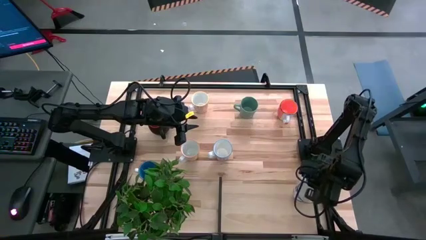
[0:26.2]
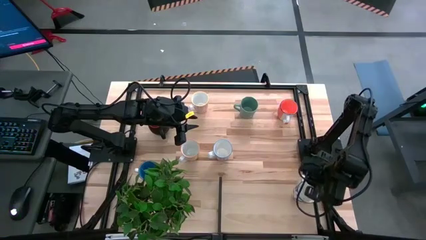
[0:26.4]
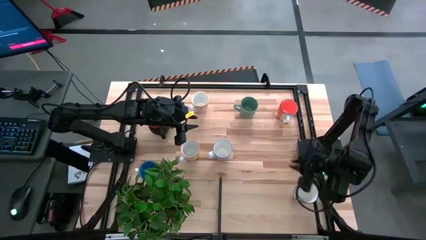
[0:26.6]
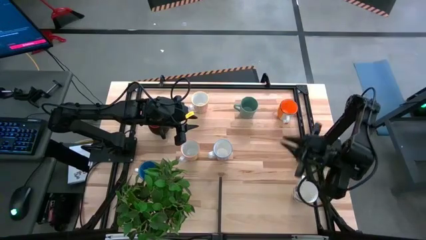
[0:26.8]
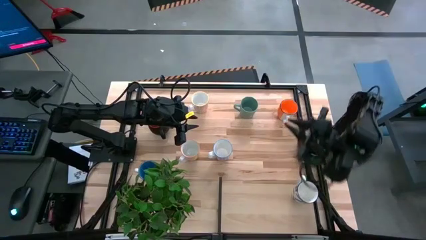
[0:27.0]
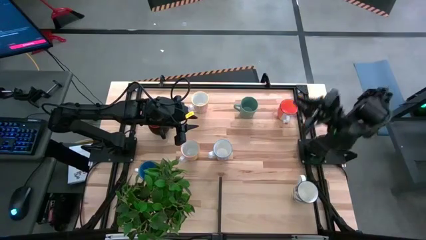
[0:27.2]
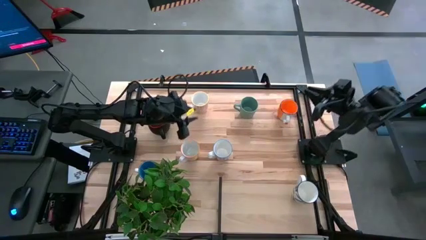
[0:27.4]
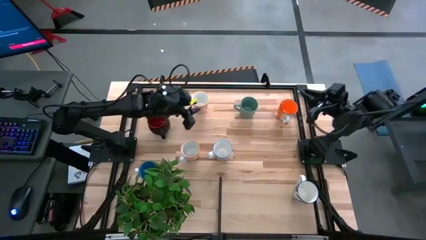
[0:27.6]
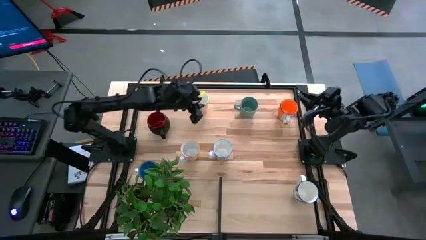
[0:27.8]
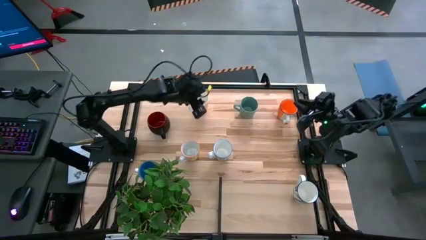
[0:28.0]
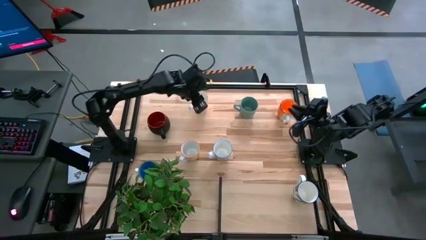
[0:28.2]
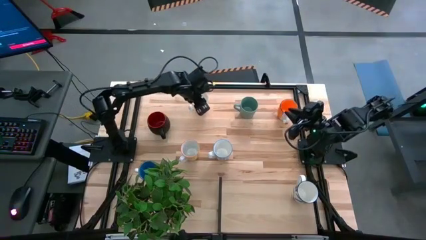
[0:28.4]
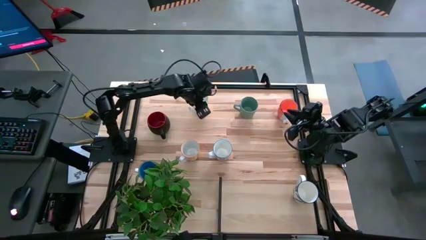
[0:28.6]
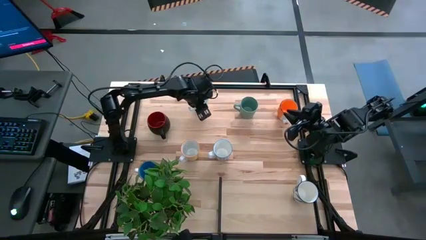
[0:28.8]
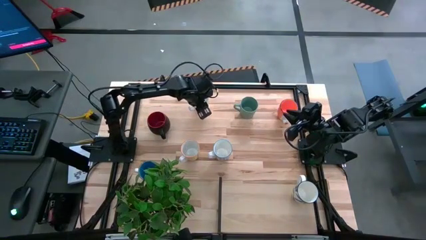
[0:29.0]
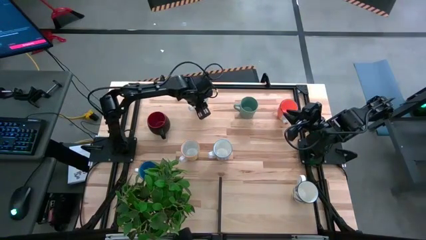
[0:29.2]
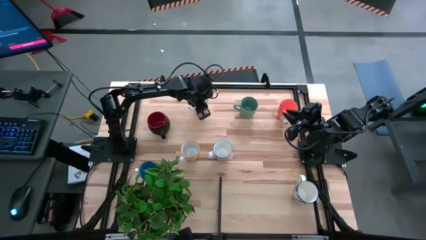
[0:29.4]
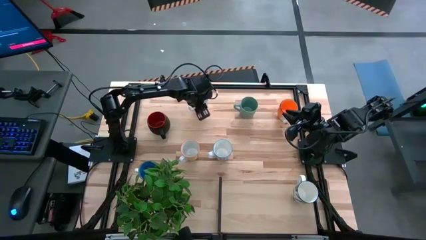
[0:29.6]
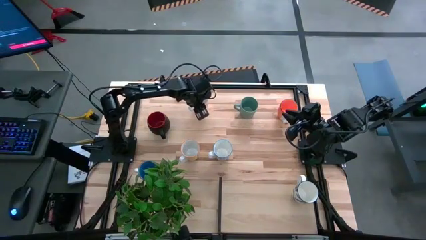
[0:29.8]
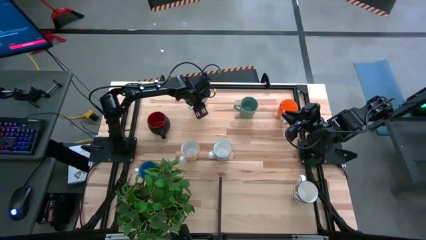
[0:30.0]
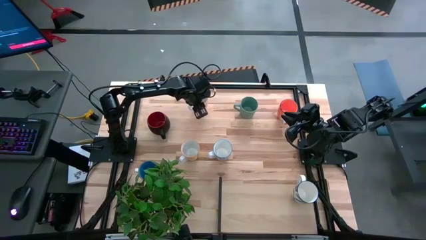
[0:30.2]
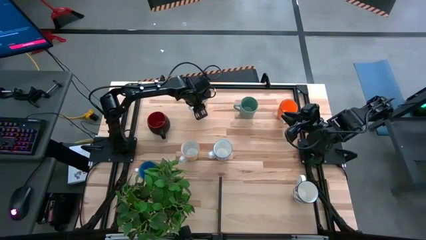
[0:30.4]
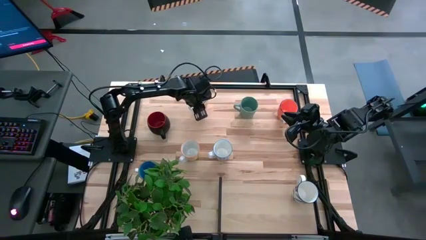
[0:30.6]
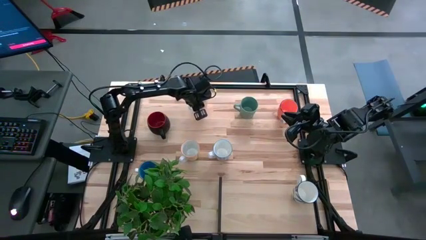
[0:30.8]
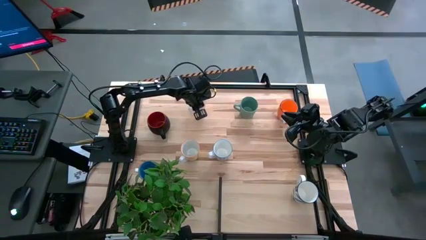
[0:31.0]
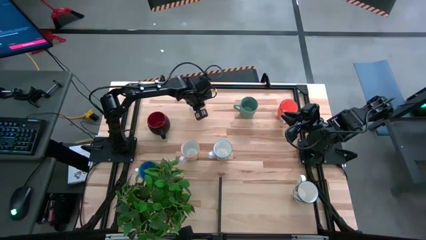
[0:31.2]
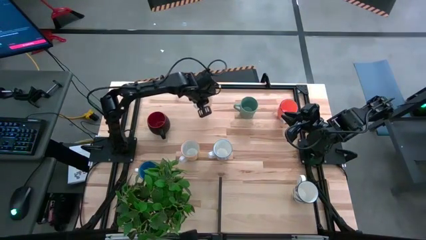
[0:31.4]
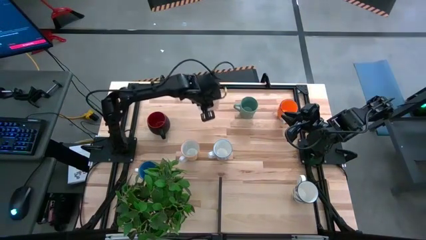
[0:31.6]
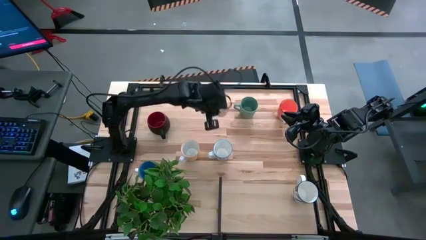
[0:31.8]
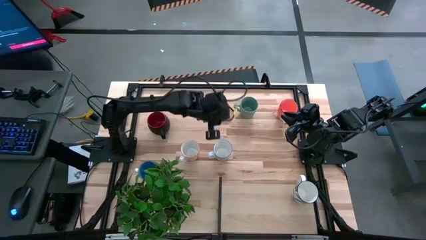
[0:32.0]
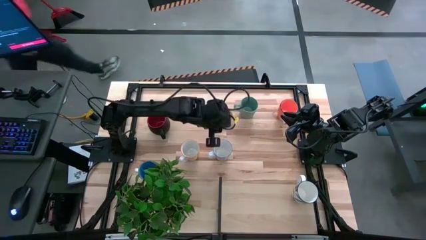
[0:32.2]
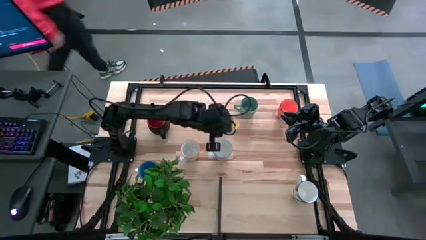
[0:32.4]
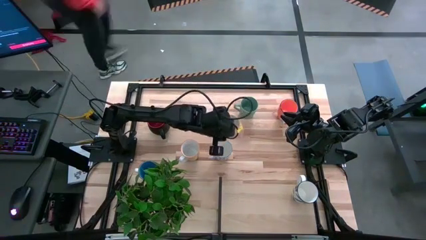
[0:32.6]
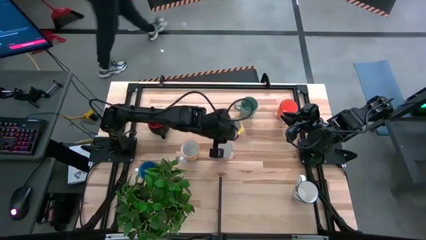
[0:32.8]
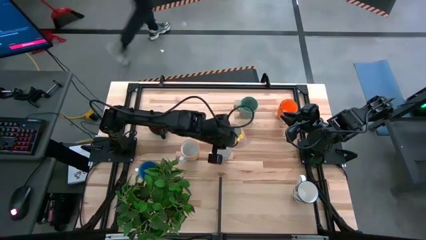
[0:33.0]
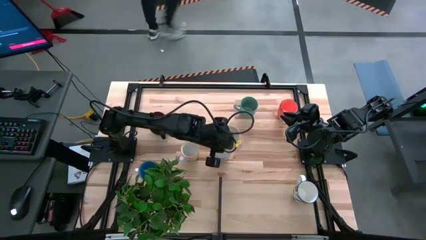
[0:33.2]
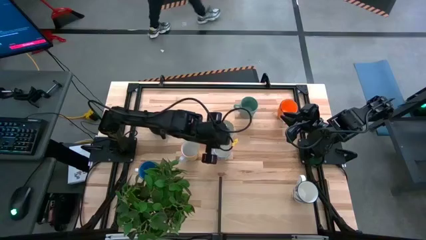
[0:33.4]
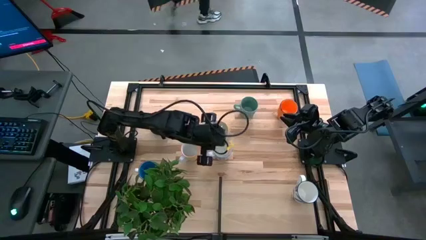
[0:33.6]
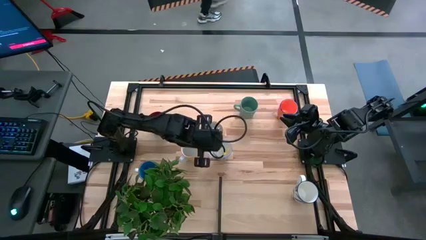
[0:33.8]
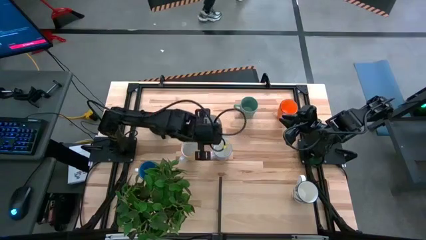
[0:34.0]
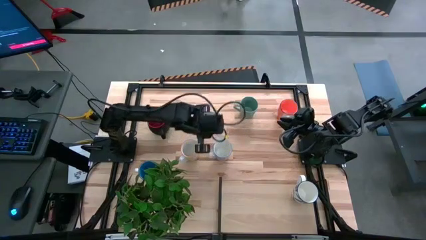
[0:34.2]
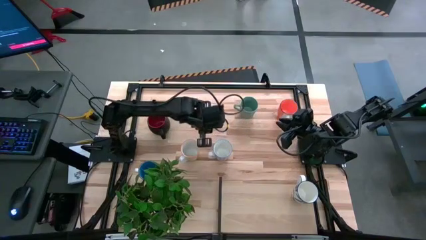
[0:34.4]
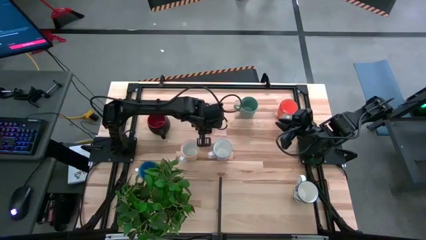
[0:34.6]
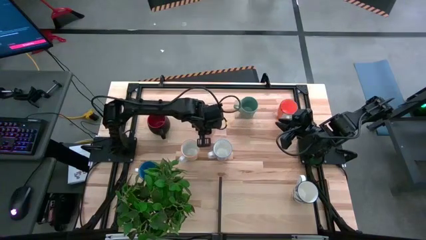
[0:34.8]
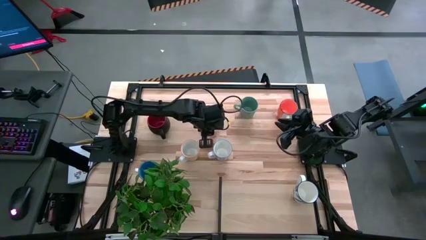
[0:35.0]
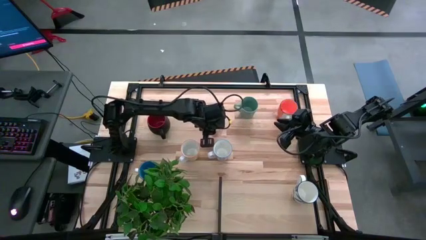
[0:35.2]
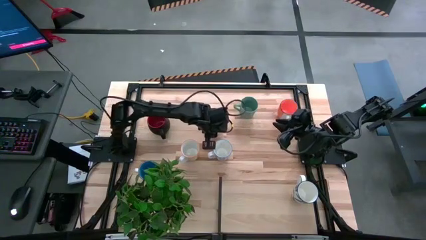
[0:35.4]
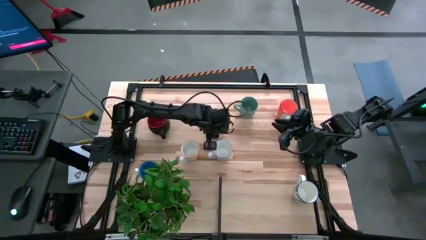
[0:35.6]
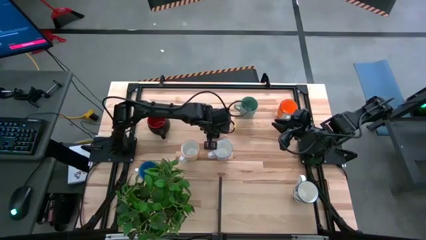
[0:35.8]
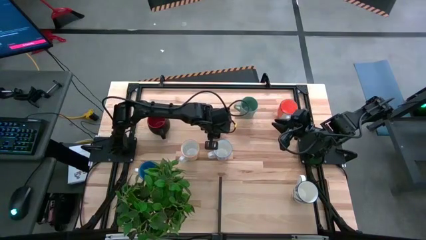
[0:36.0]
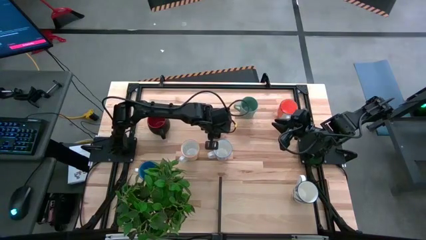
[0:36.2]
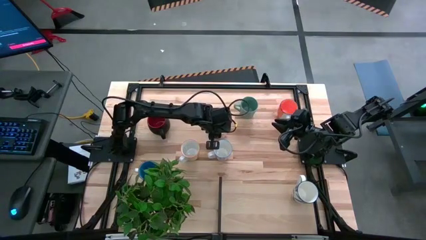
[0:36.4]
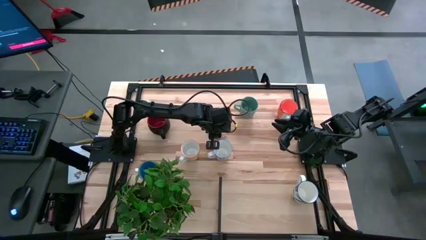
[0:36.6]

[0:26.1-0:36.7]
Task: Place coffee mugs
Move the orange patterned mug to the top of the red patterned mug

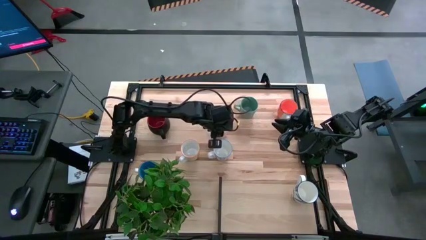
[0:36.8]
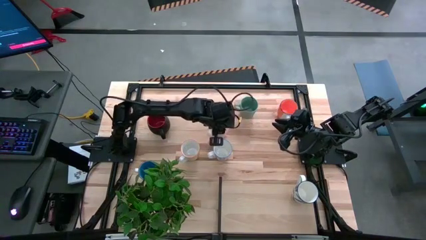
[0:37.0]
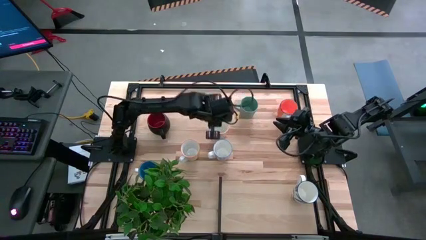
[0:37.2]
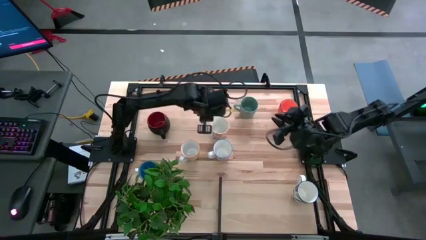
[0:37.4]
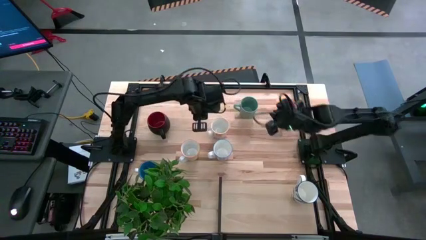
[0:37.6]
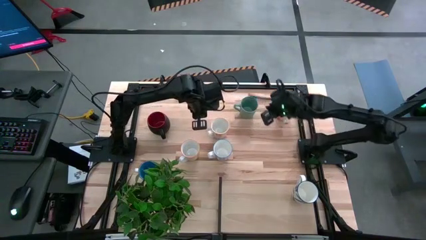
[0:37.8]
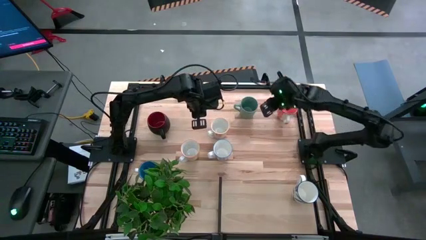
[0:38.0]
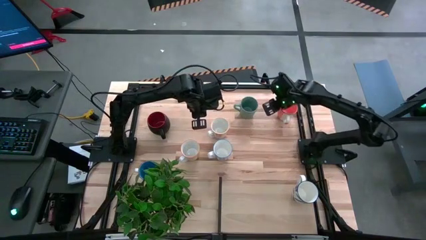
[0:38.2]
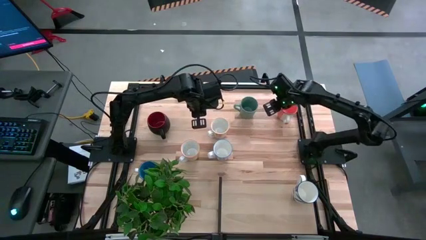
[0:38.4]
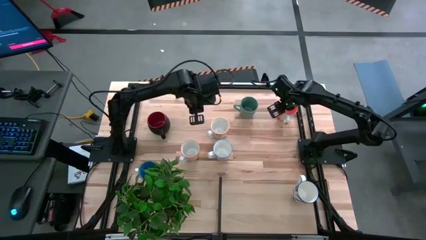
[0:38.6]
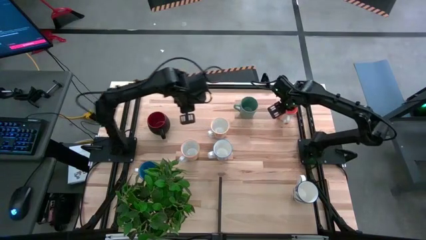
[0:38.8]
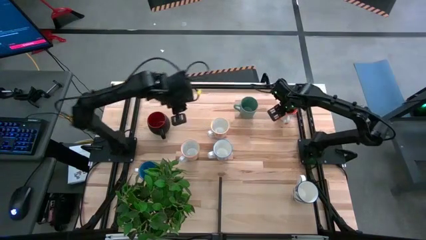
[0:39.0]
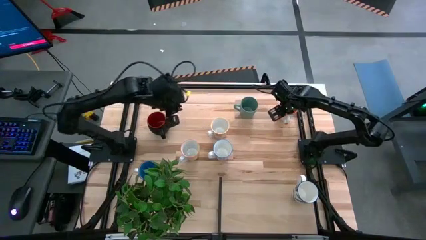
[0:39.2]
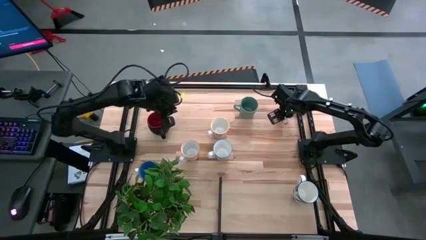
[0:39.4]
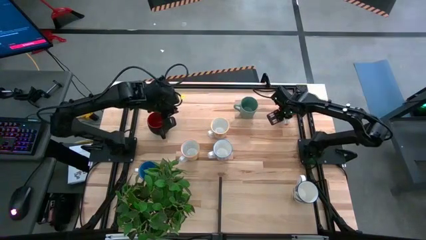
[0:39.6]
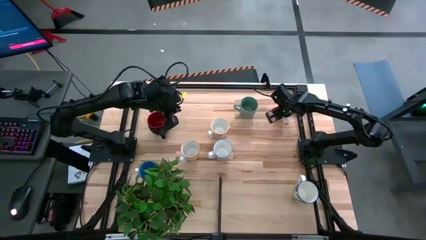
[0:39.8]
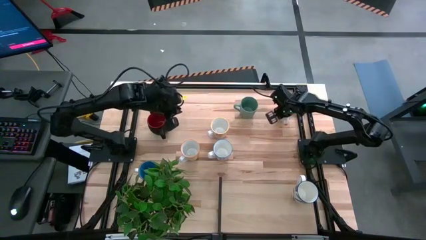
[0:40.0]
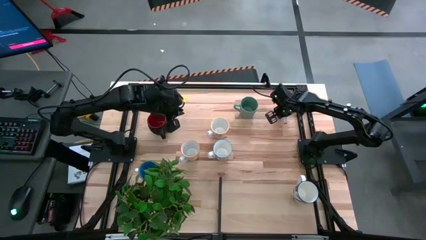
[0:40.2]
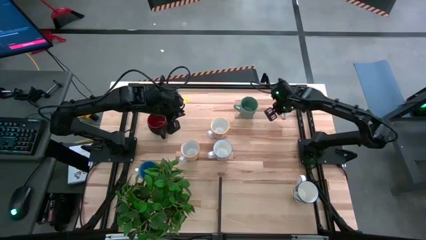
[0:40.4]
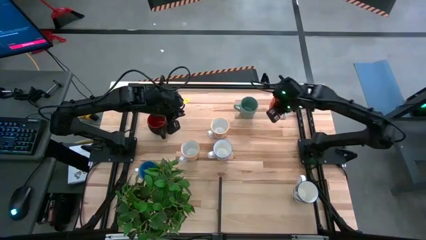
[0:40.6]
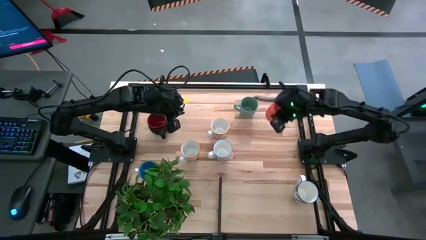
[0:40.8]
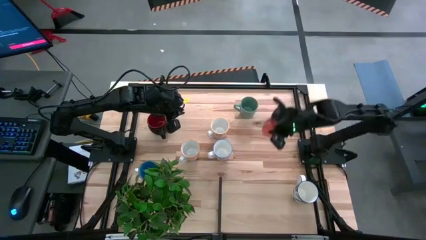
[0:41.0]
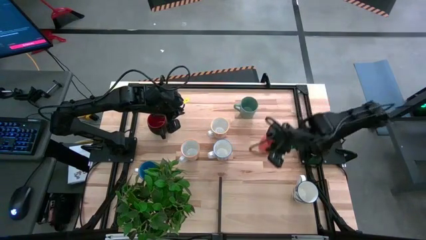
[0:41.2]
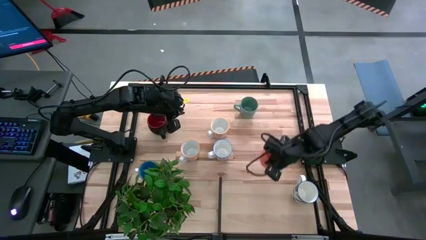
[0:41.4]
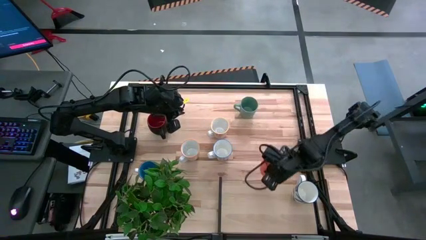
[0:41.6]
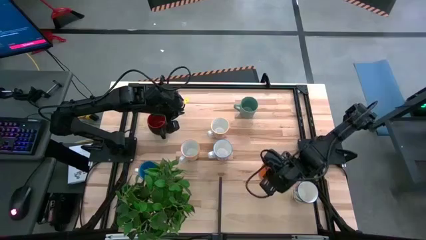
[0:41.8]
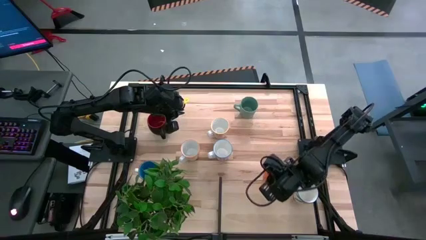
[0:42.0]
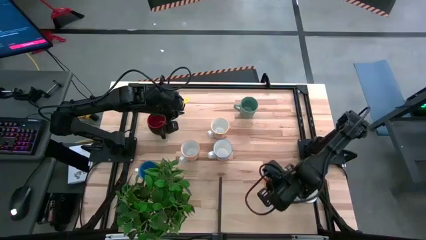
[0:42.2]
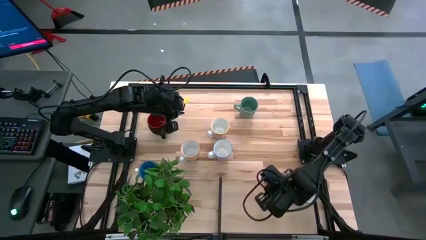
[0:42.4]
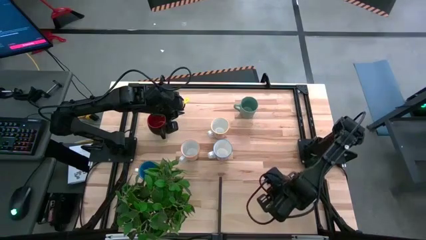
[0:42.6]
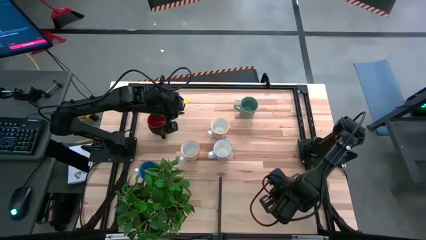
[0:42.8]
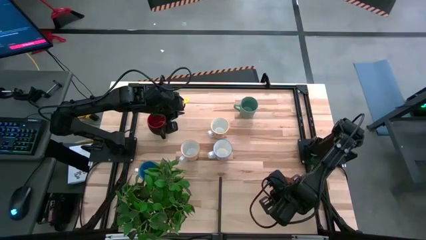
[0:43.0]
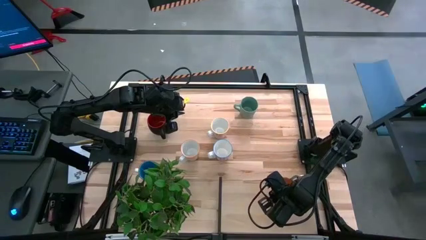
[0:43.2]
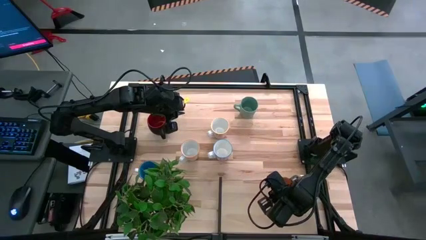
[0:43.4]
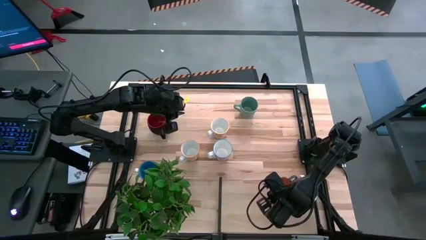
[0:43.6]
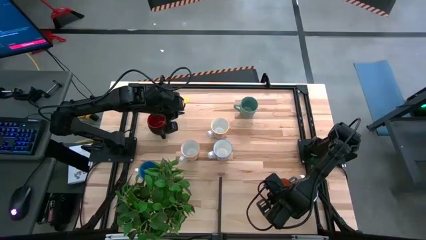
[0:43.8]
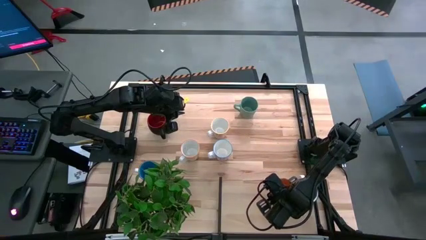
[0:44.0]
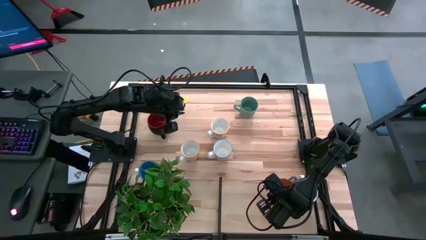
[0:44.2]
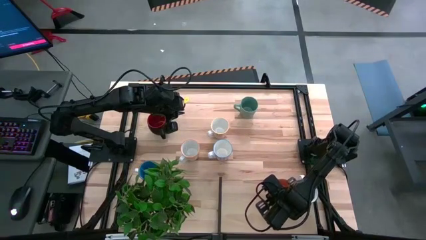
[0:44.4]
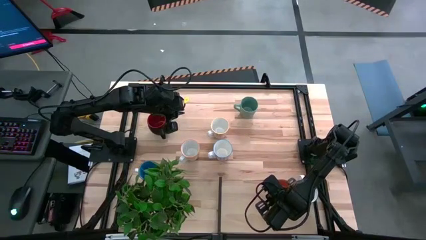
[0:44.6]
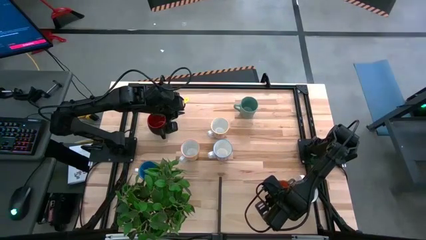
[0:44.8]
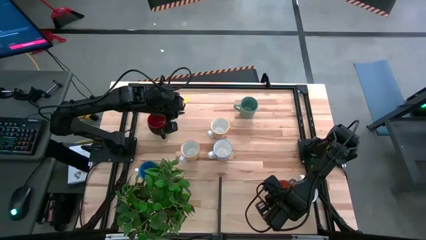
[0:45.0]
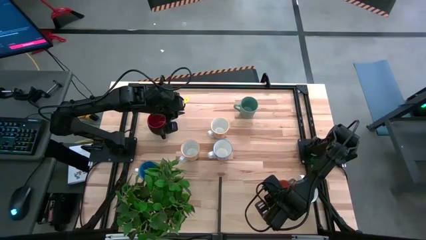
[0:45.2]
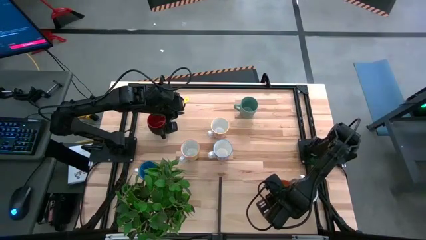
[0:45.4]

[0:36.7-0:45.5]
Put the orange mug on the shelf
